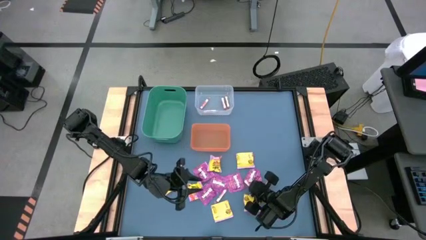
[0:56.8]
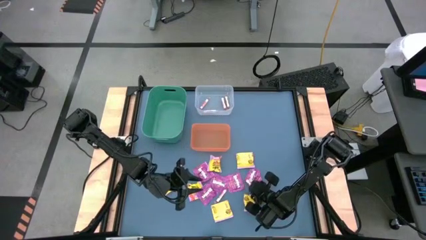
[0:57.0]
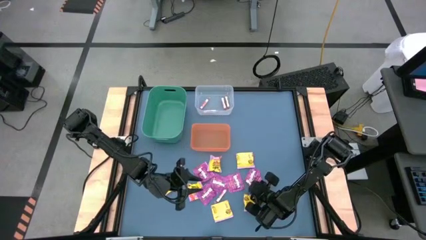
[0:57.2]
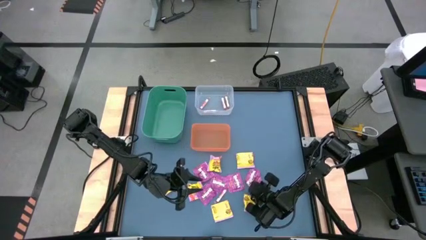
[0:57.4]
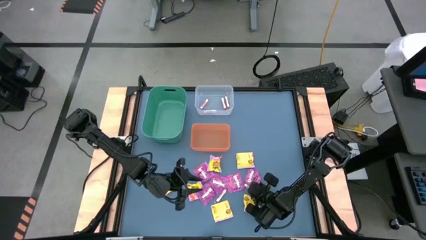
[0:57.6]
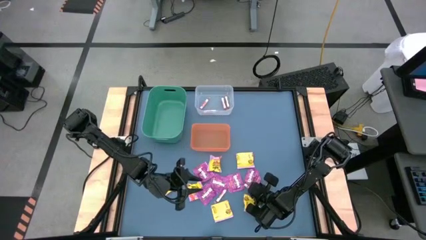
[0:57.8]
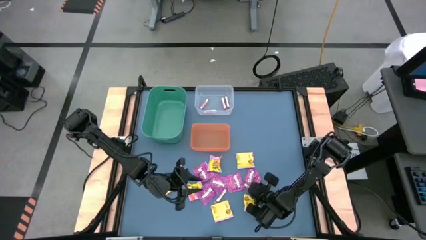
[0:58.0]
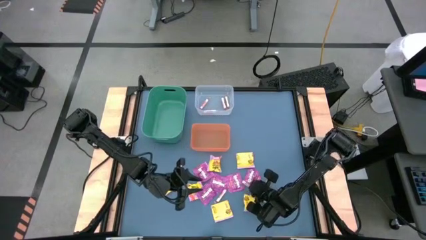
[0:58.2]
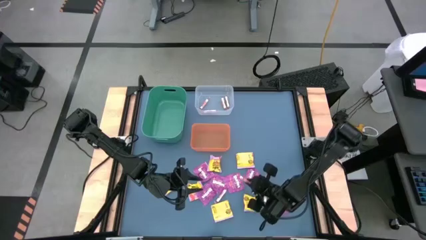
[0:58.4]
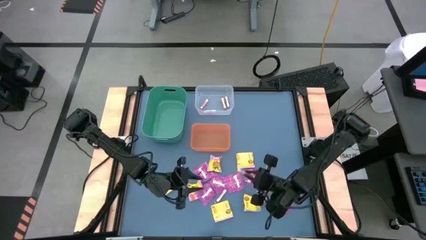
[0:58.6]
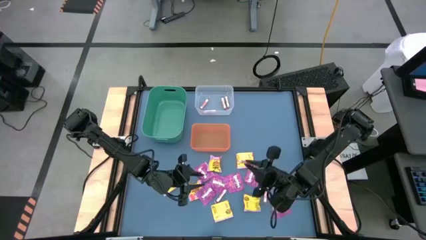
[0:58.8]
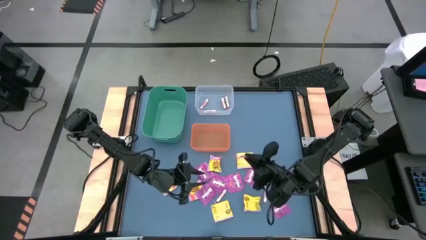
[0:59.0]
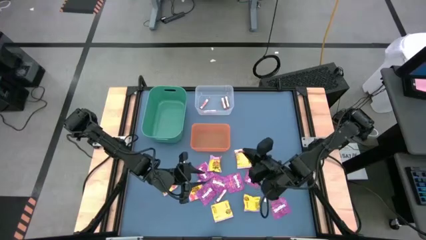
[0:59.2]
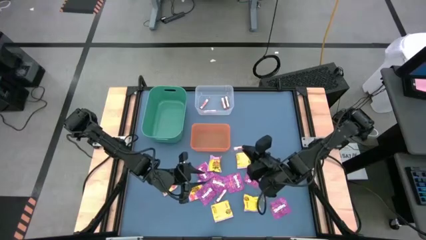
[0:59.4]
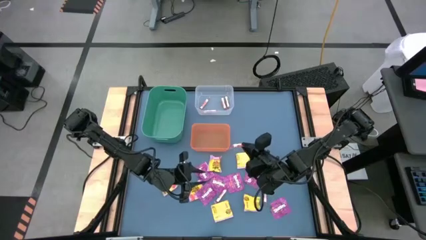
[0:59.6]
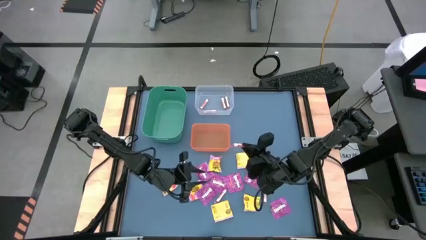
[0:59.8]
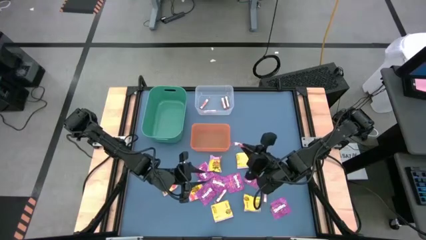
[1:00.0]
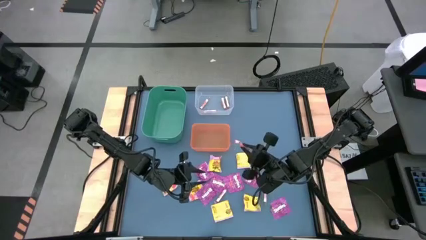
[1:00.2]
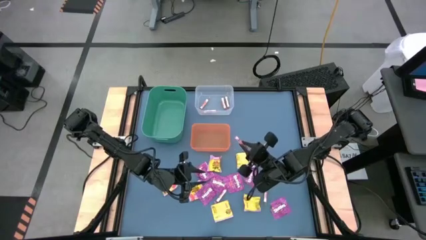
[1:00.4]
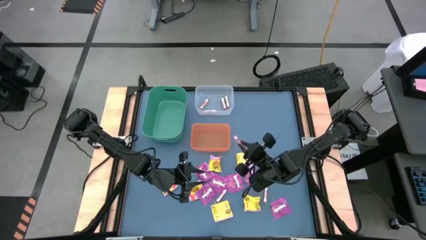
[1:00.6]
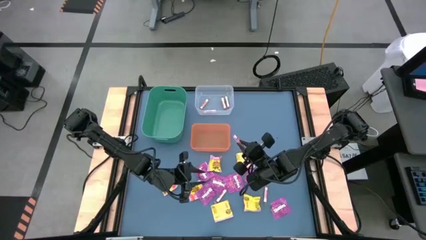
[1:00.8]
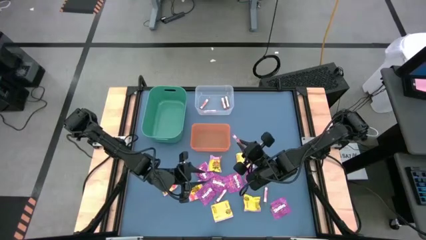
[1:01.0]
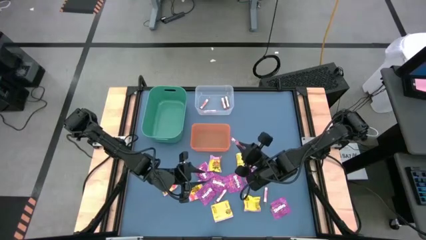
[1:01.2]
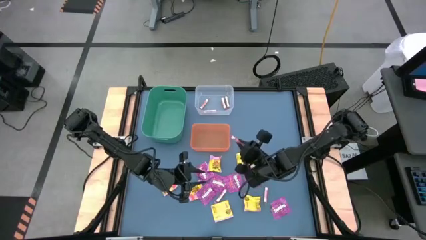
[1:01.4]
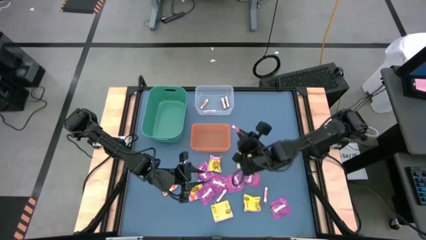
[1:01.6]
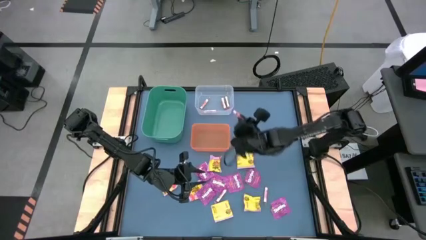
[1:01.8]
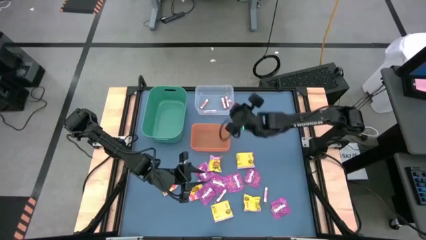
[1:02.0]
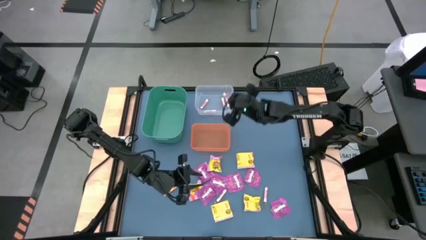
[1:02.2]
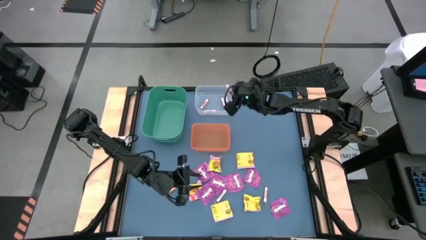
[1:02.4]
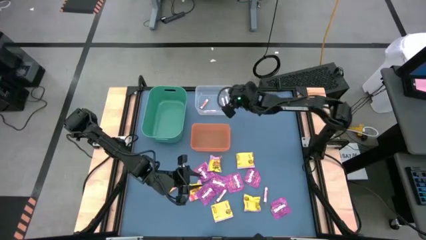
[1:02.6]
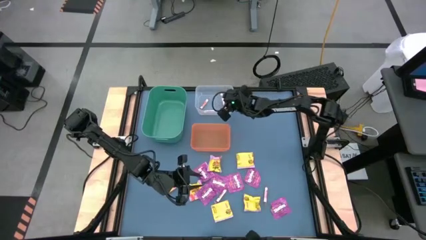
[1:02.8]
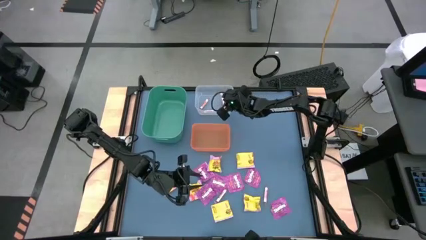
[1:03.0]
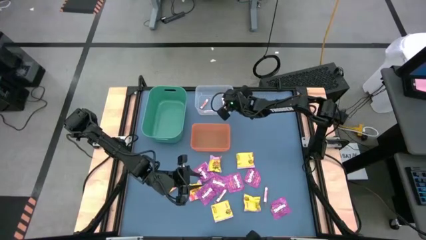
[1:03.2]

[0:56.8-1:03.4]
Task: Sort candy
Put the white candy into the transparent bin

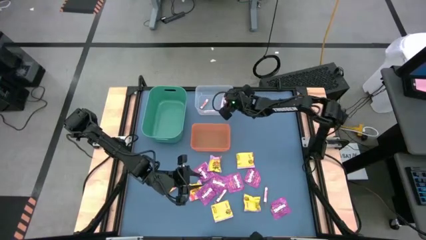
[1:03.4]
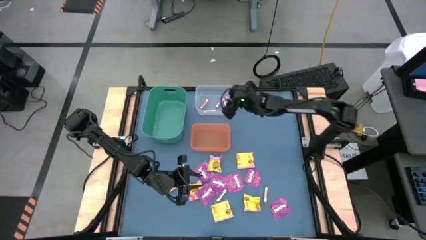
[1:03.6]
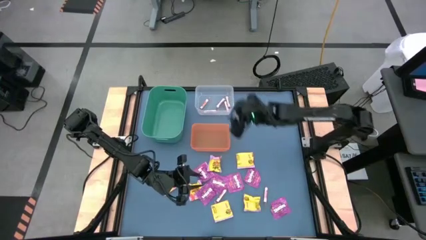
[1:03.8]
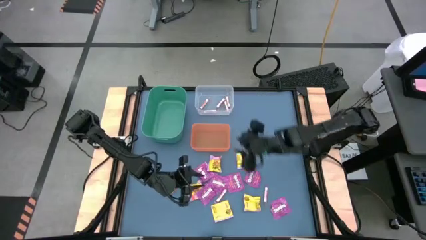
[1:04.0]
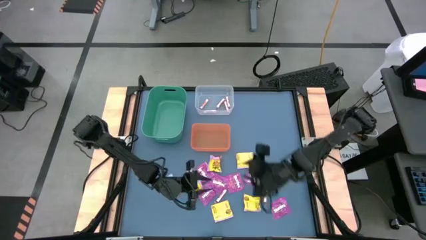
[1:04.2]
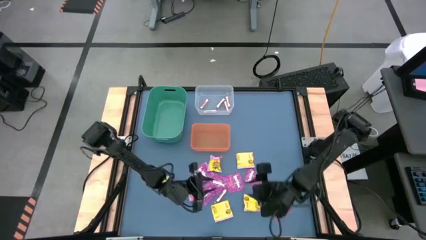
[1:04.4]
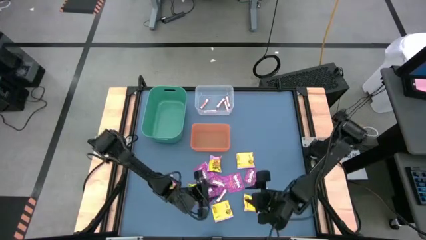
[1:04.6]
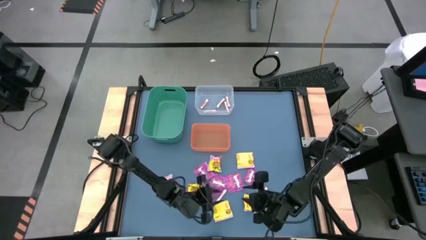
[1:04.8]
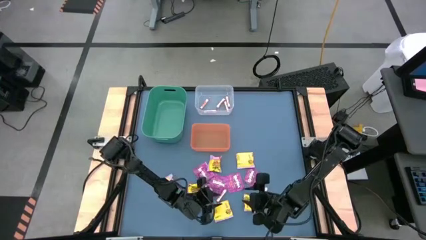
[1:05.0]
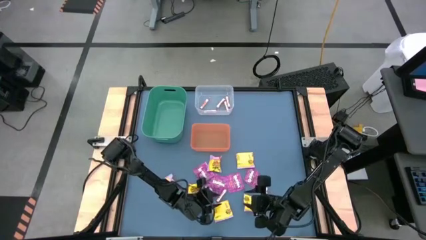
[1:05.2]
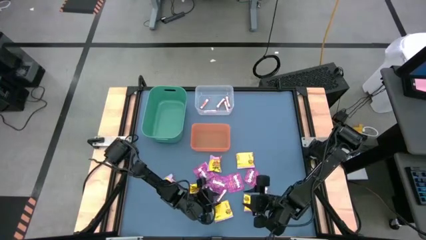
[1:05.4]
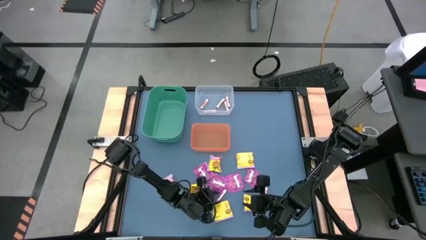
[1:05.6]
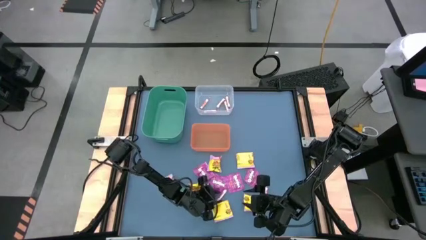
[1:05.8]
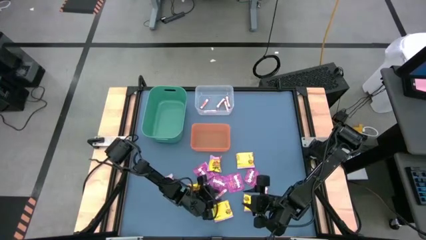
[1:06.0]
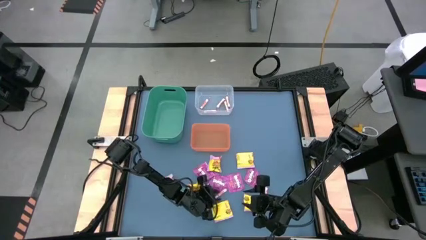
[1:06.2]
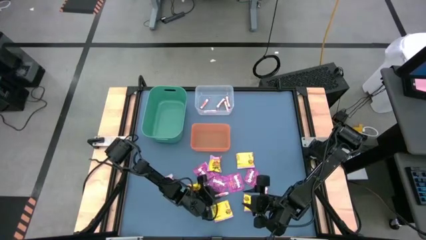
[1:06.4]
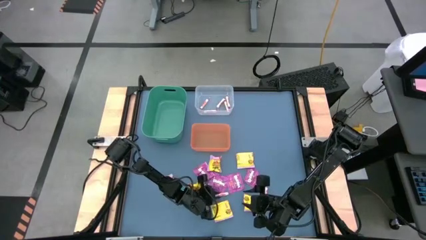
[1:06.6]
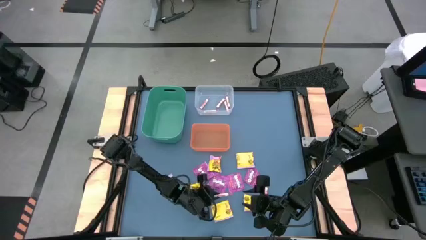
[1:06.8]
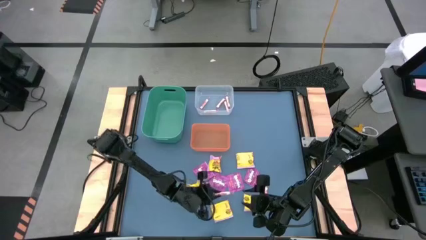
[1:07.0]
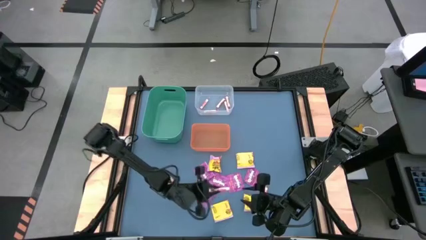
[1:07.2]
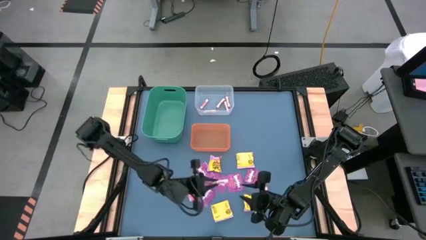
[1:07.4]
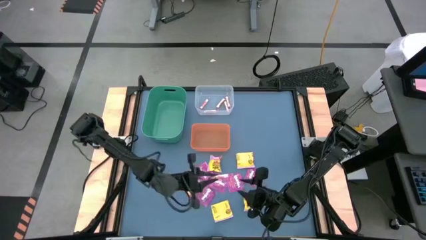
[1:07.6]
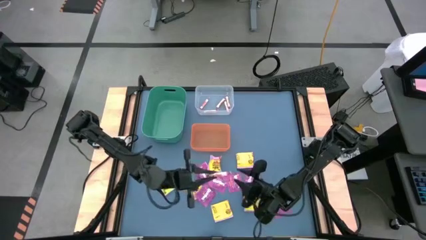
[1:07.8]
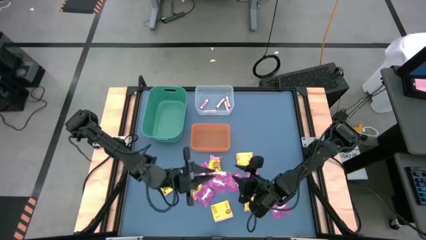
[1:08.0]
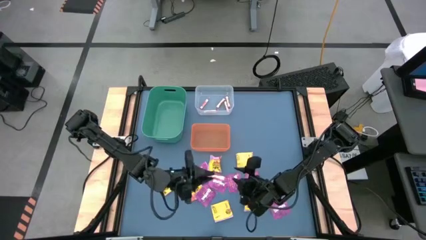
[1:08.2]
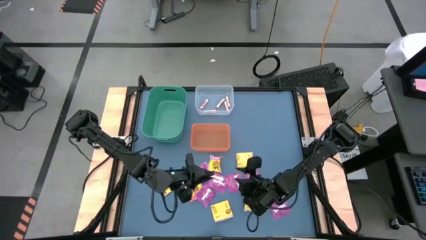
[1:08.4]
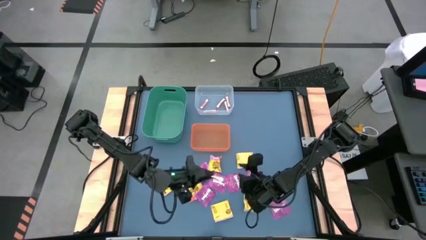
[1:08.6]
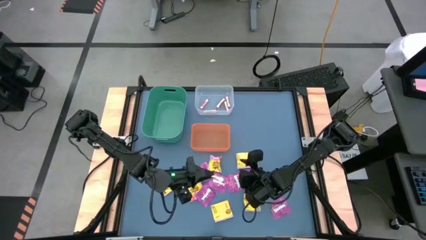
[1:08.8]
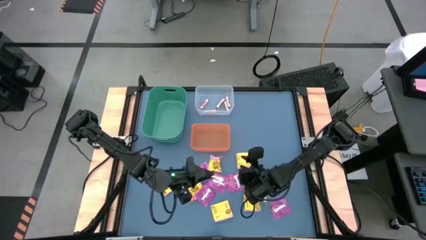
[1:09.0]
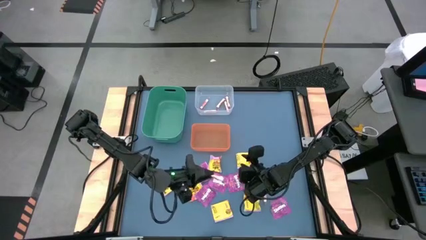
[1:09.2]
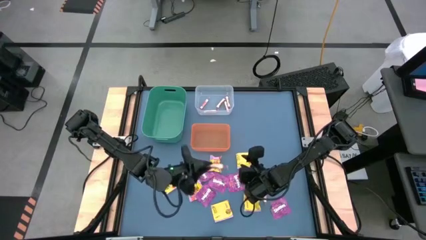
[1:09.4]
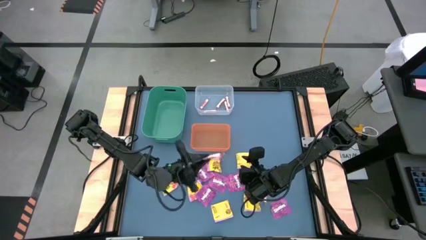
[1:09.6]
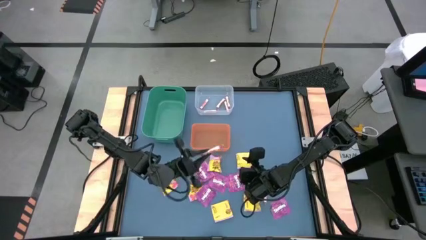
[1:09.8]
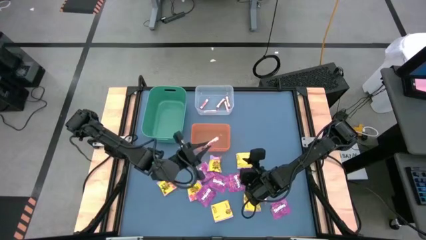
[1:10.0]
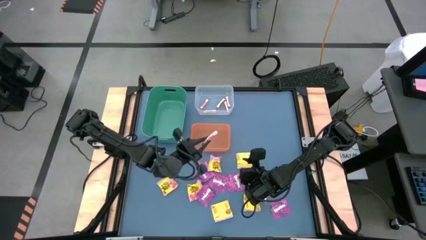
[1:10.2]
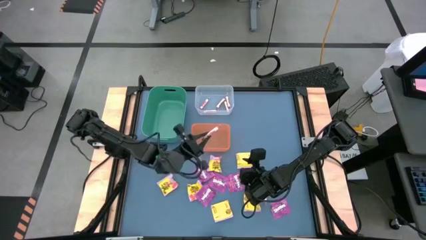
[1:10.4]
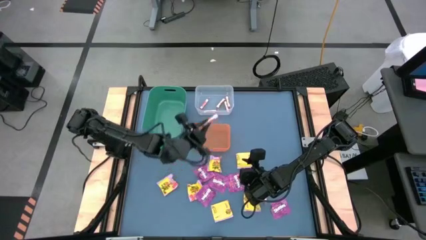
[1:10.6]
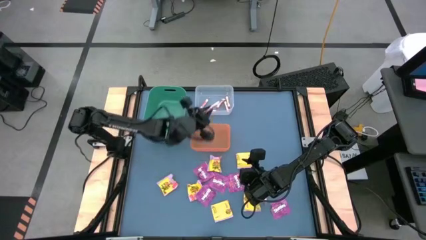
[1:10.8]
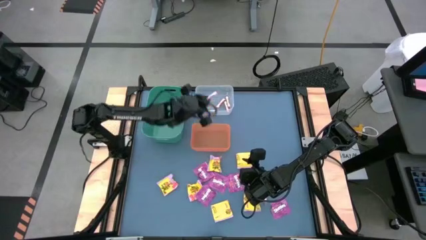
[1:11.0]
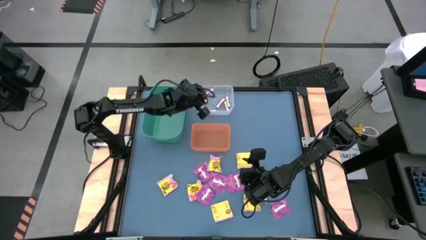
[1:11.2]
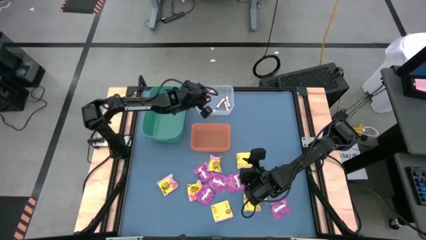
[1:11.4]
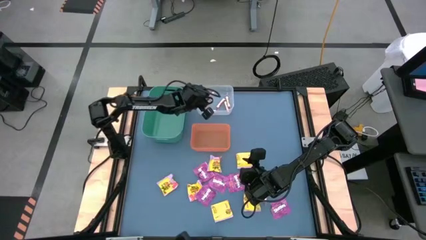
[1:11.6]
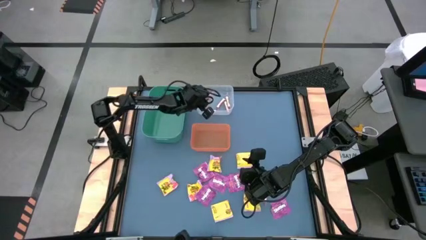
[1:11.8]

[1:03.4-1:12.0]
Put the white candy into the transparent bin

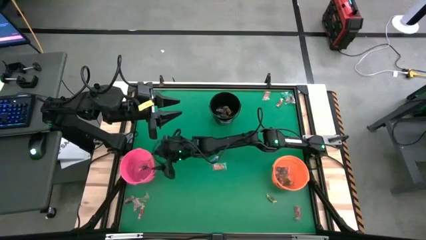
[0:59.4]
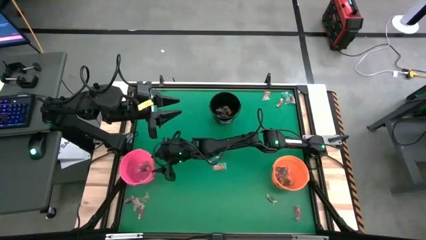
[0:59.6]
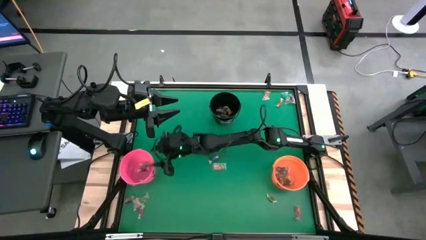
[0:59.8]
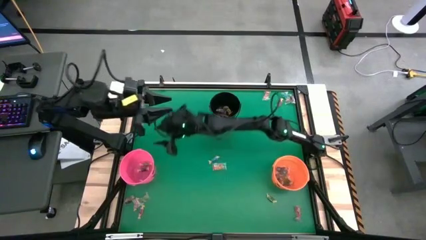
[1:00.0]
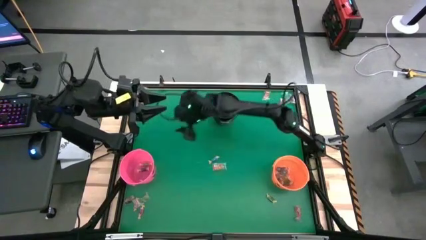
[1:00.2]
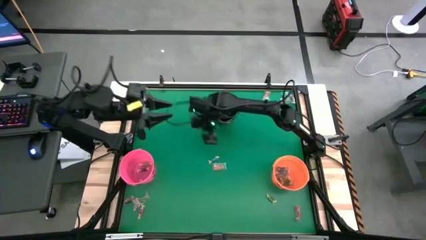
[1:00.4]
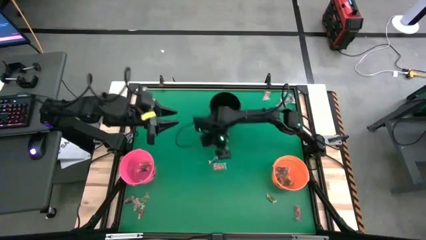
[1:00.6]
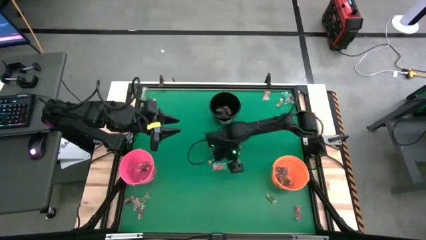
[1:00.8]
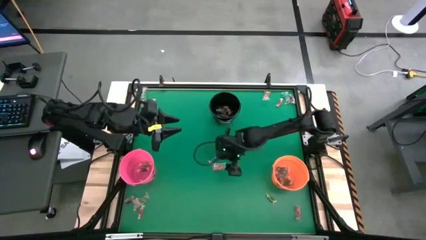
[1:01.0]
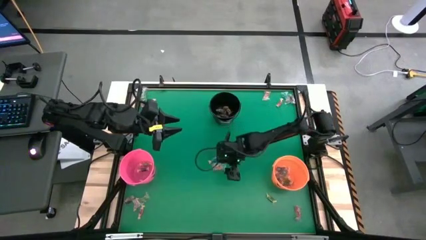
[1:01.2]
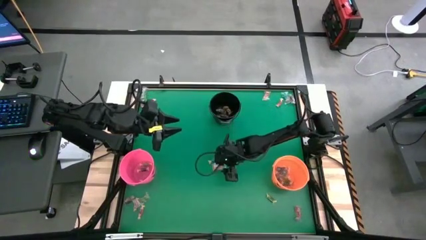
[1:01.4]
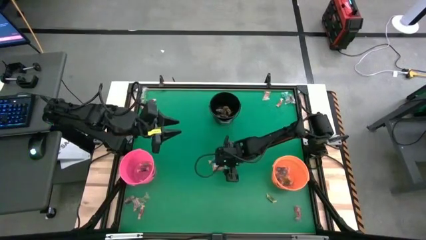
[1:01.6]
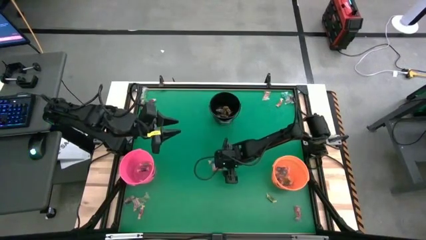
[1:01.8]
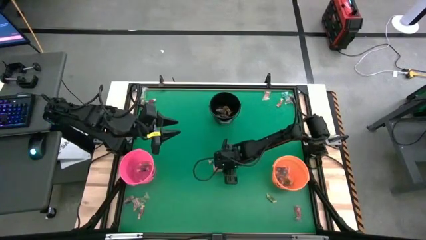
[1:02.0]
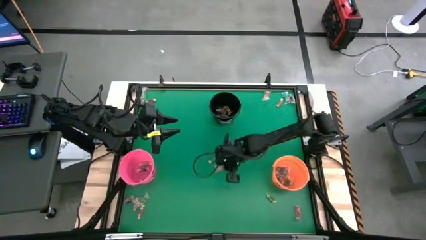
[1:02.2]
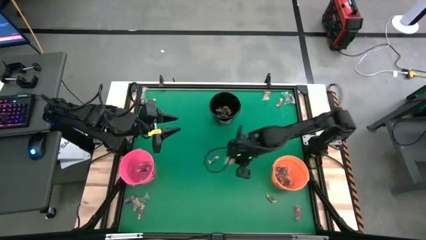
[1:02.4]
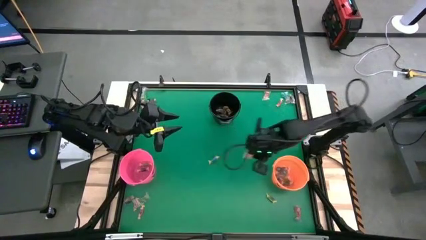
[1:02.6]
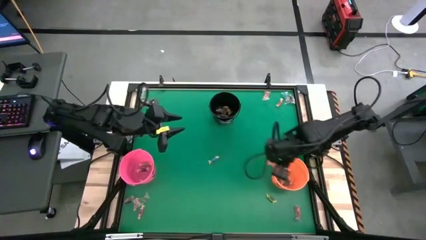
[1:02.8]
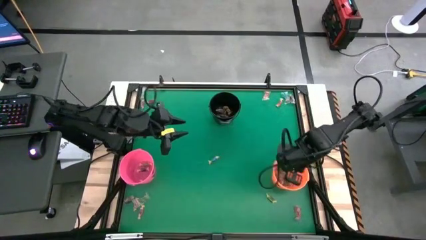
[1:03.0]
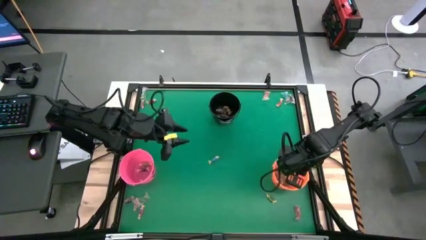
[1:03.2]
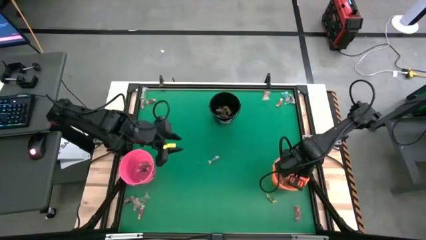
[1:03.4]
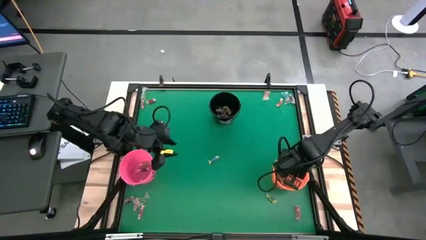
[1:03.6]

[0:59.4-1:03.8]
Task: Sort candy by brand, put in halloween buckets
Put the orange gummy into the orange bucket
